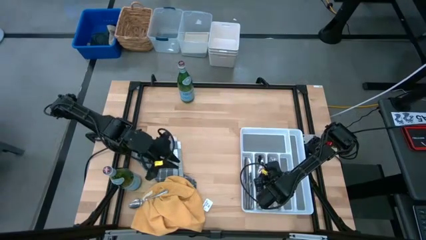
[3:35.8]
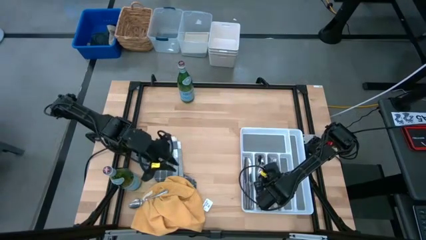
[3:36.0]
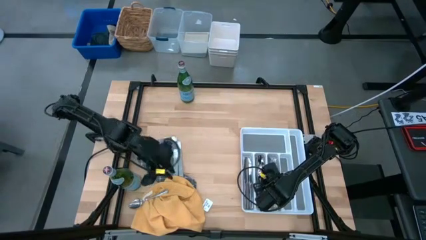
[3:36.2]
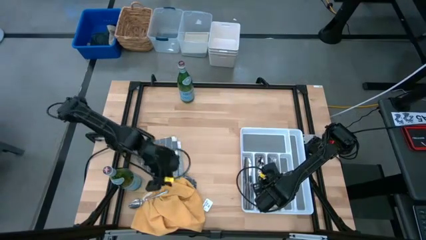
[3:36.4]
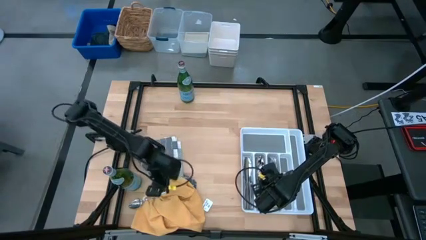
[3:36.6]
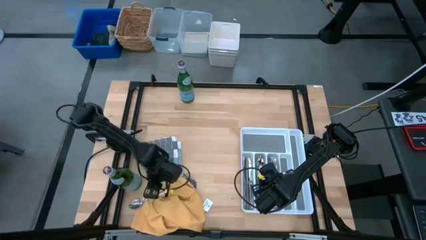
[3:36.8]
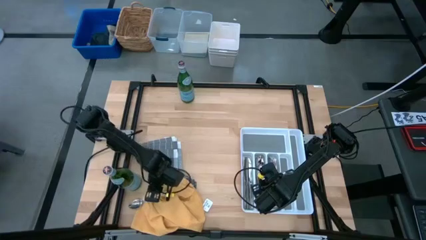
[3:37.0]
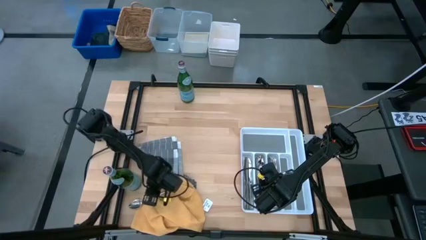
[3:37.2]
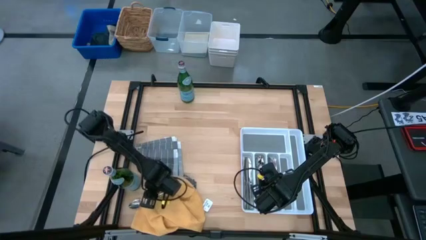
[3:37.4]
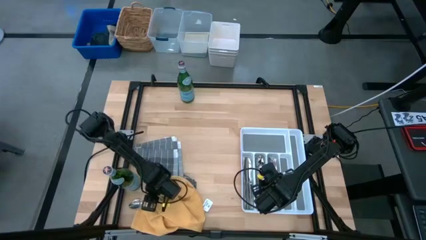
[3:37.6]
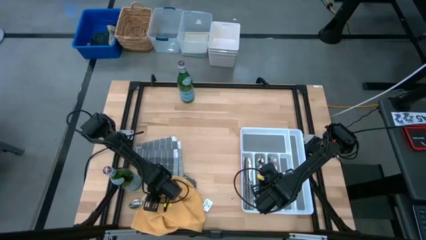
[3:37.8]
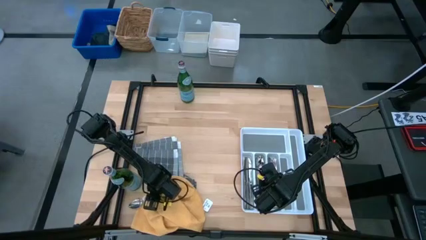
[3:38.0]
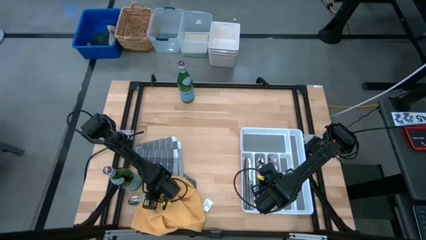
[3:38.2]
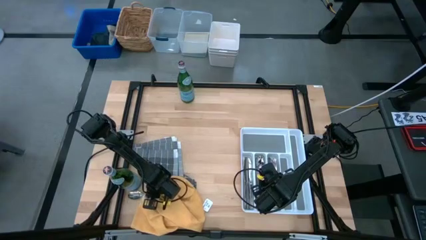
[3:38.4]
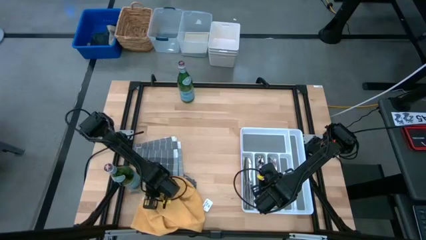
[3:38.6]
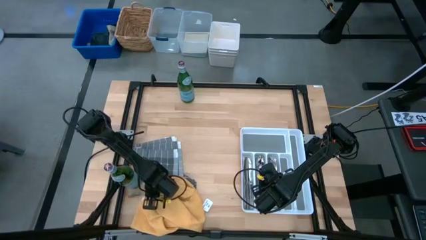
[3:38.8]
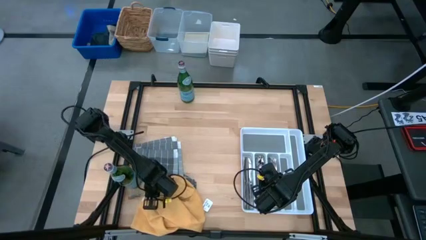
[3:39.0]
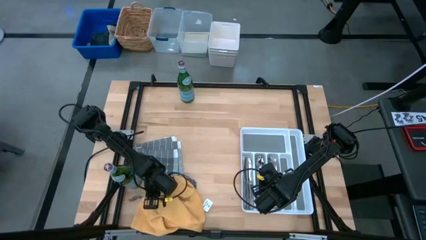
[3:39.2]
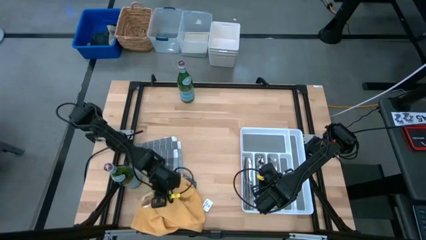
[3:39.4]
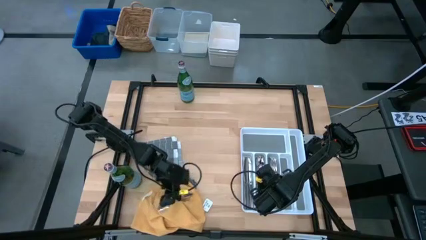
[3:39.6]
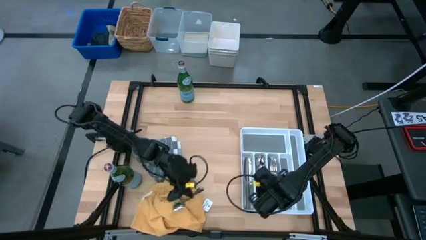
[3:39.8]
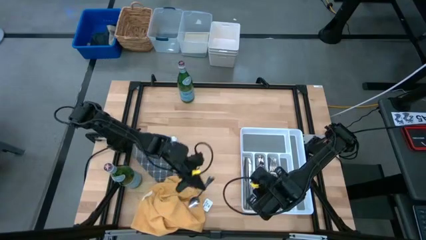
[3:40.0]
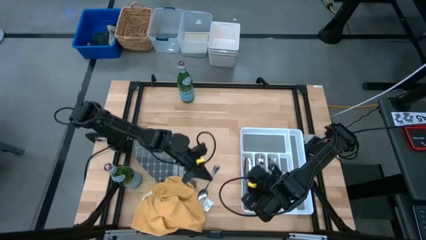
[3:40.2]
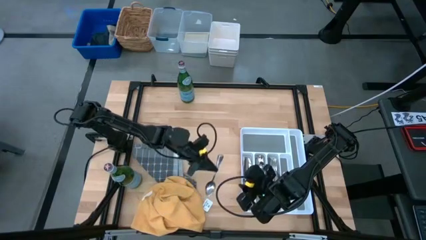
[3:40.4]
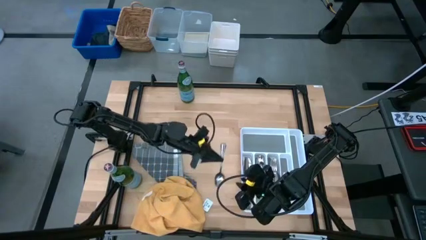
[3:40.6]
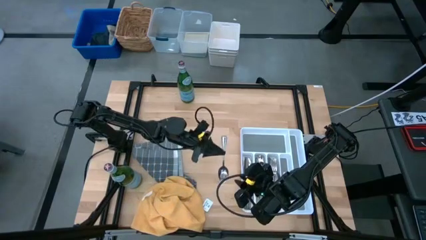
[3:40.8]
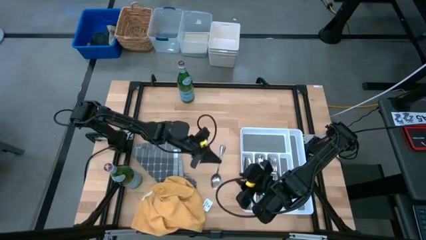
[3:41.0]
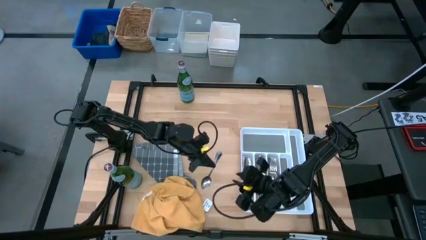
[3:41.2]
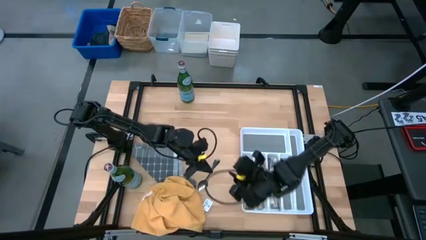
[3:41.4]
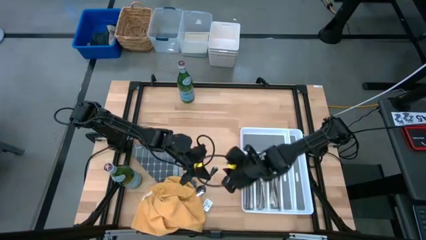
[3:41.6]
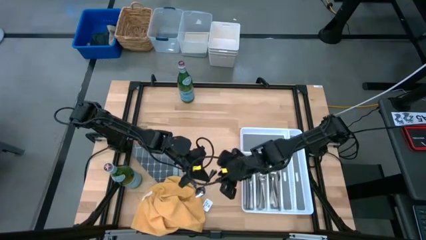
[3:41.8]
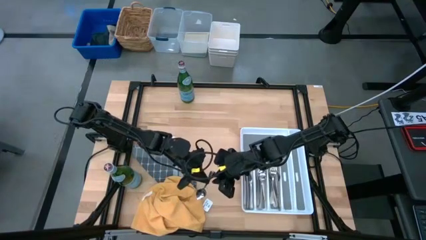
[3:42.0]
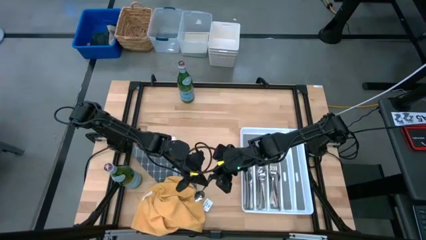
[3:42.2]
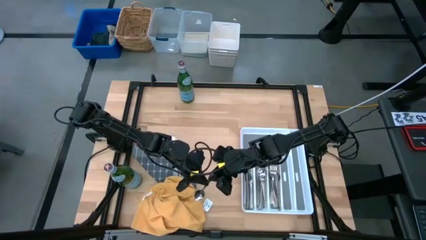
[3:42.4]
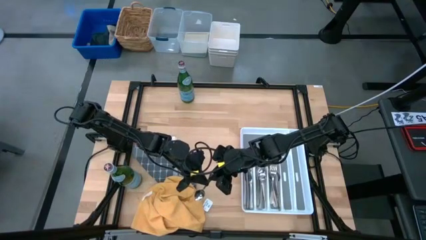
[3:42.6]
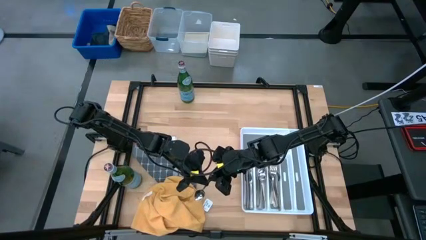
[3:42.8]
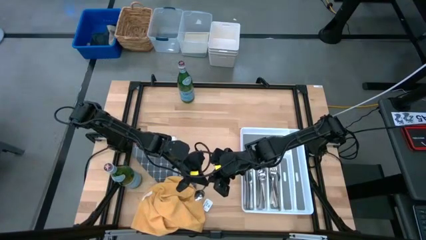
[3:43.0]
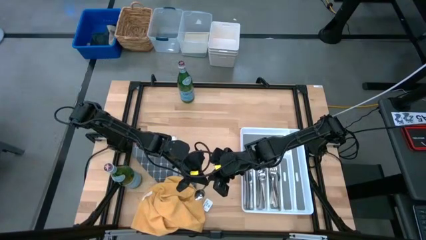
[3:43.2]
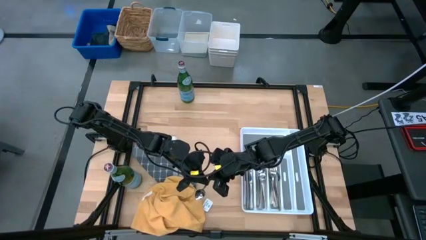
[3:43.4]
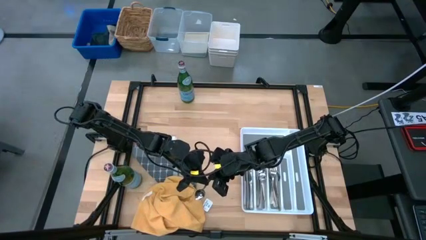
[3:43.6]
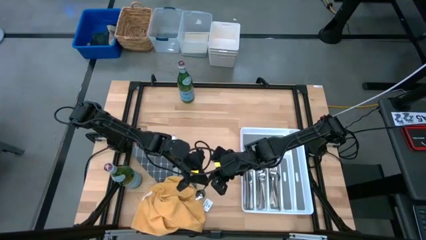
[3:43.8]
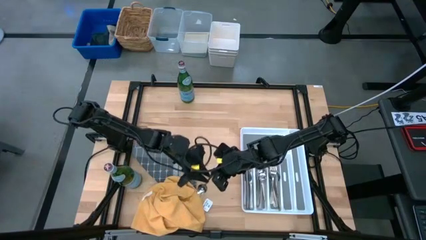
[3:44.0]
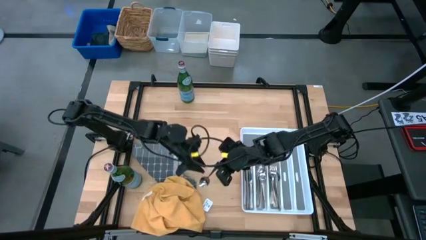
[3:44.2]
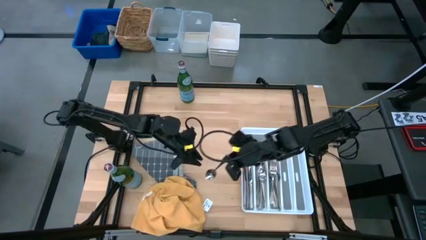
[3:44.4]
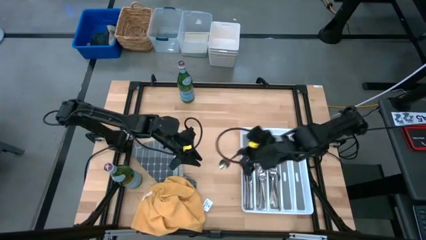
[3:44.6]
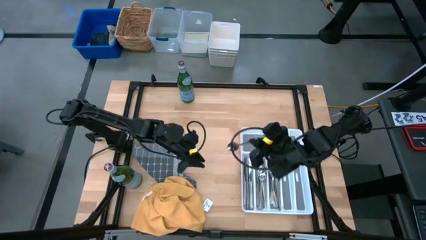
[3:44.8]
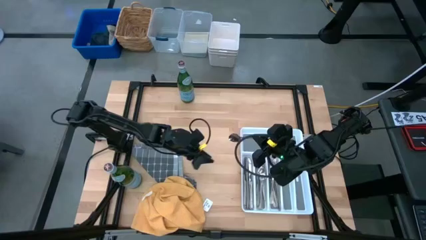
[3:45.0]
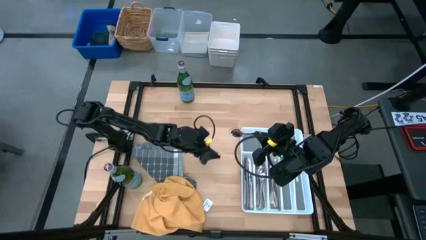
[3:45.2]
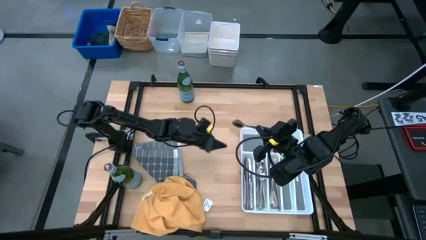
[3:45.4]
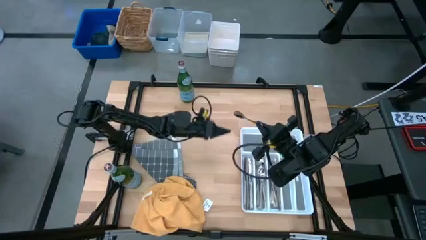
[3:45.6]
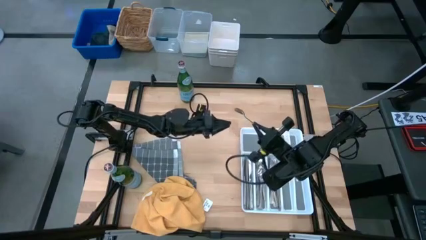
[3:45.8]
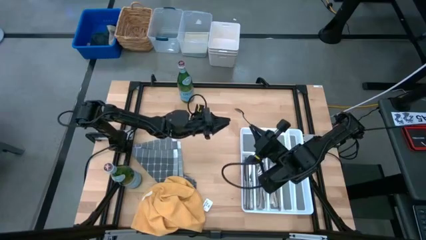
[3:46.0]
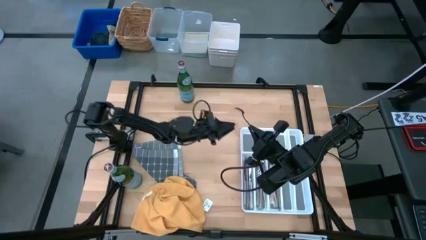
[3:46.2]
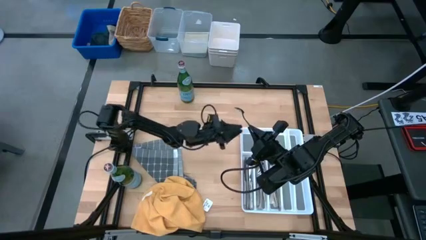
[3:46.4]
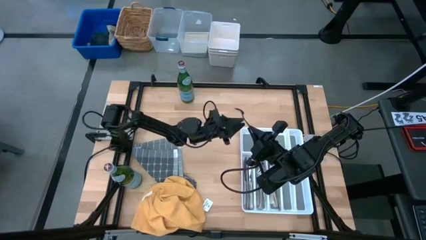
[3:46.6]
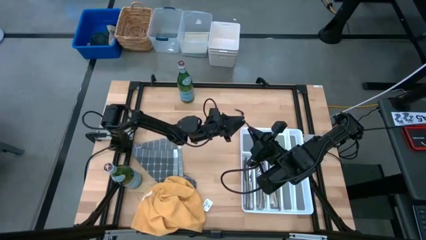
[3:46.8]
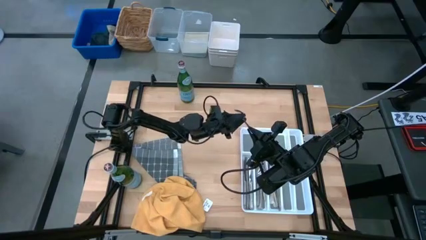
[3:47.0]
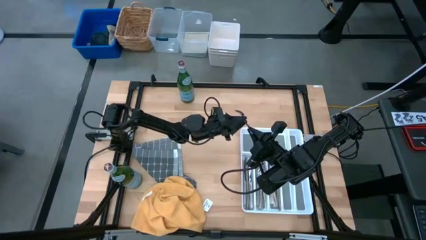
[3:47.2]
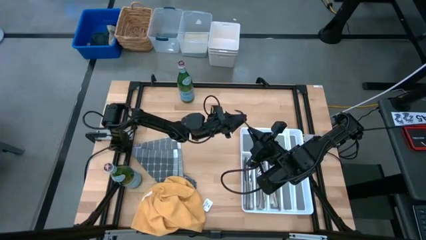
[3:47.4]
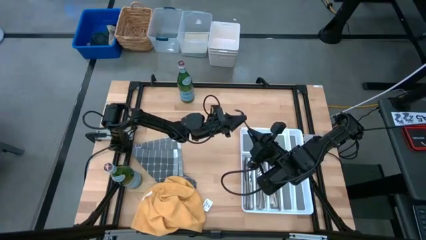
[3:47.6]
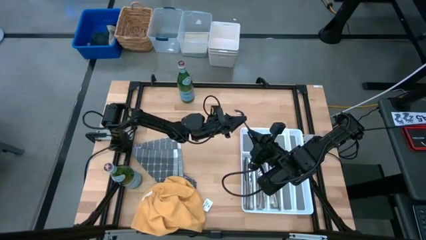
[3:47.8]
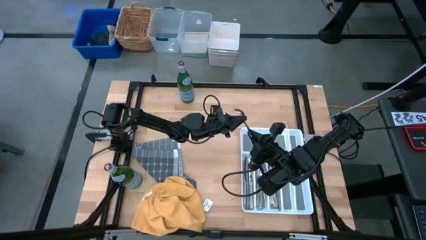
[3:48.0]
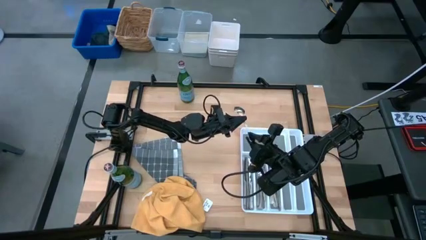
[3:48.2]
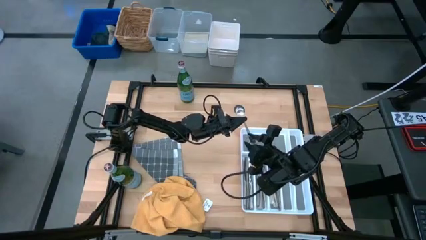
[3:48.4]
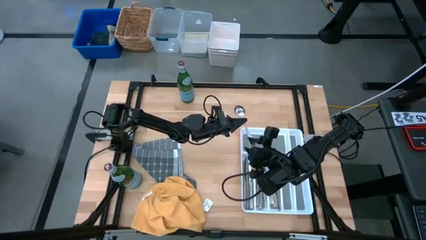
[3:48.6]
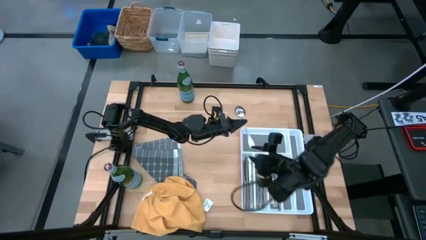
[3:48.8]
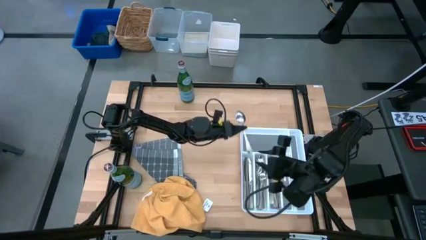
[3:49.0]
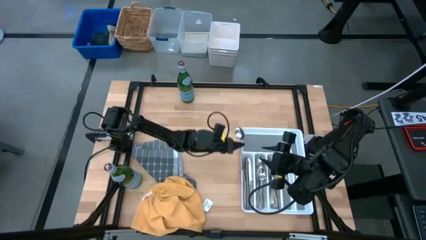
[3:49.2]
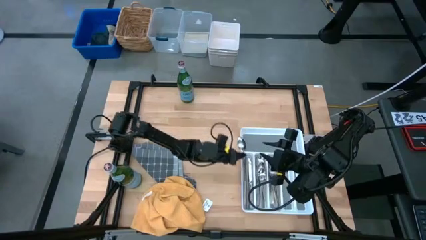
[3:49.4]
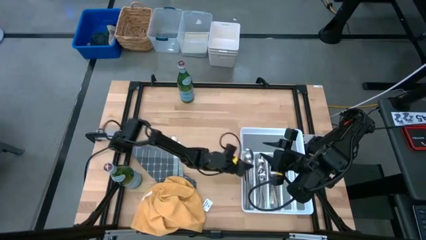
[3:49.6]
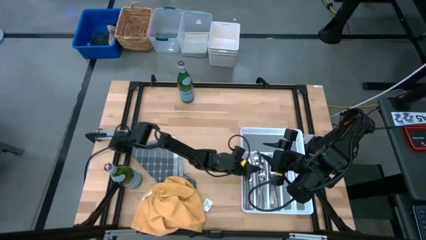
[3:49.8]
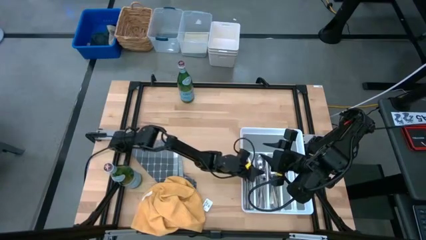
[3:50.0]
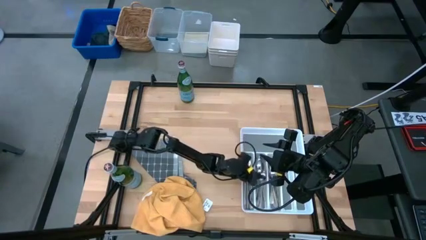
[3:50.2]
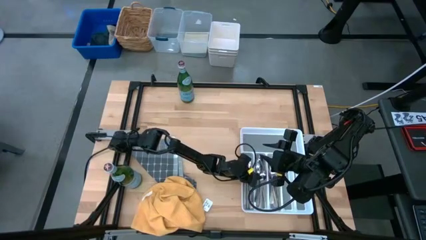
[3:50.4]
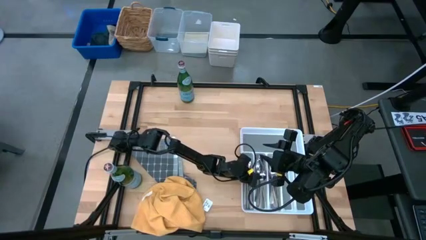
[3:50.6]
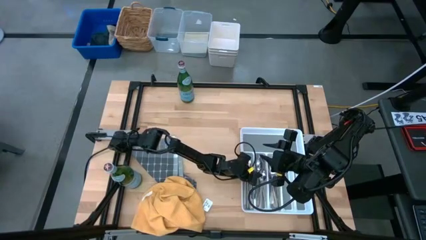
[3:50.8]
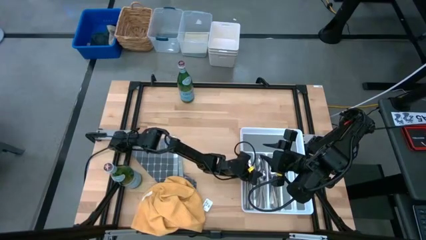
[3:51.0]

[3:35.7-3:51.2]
Stack the silver spoon into the white utensil tray with the other silver spoons
